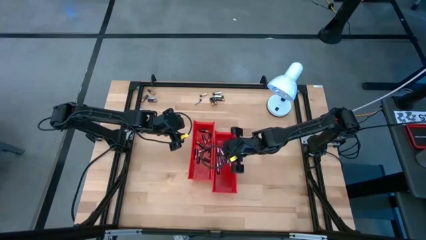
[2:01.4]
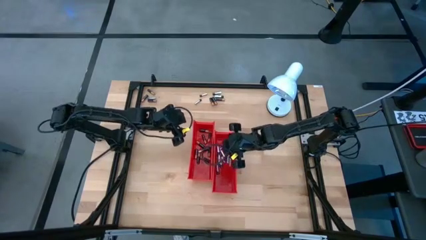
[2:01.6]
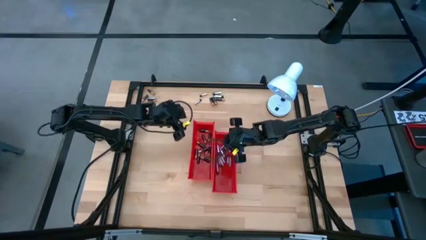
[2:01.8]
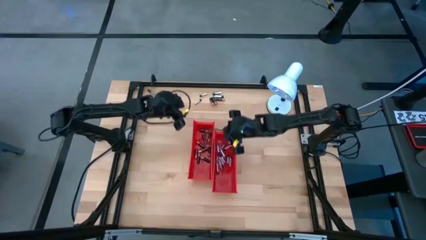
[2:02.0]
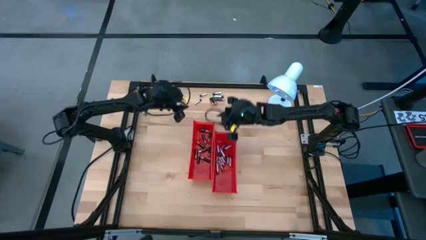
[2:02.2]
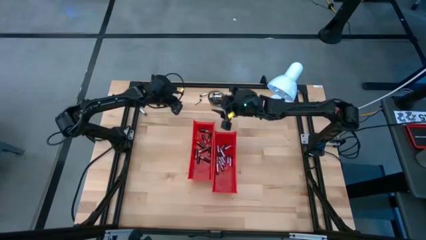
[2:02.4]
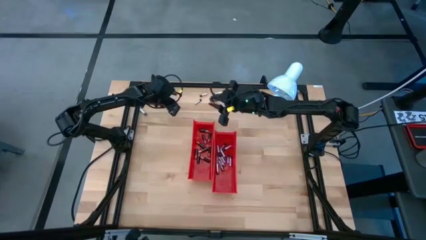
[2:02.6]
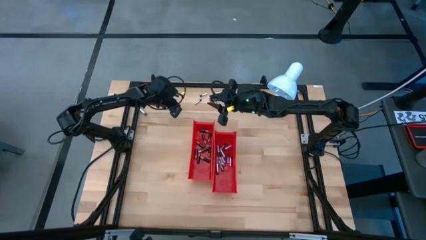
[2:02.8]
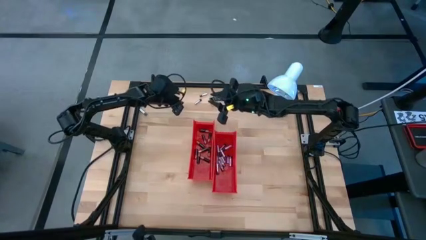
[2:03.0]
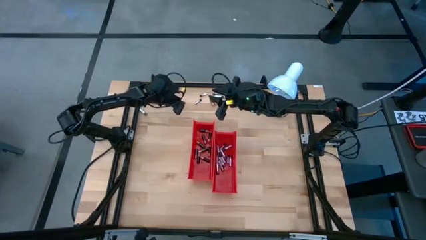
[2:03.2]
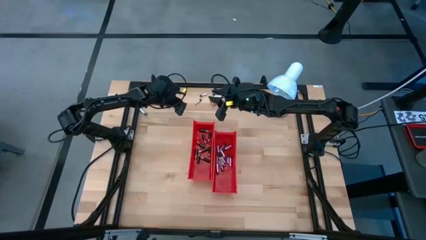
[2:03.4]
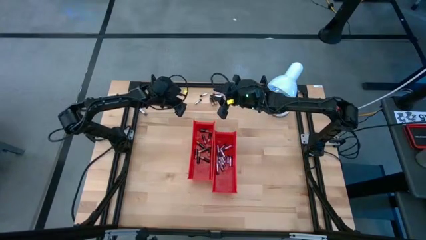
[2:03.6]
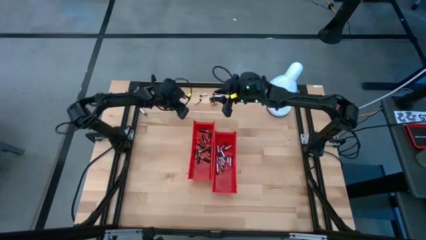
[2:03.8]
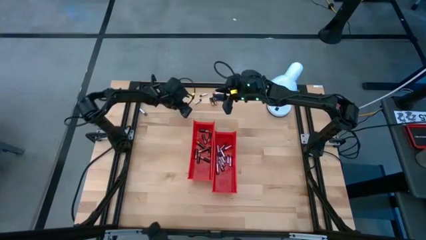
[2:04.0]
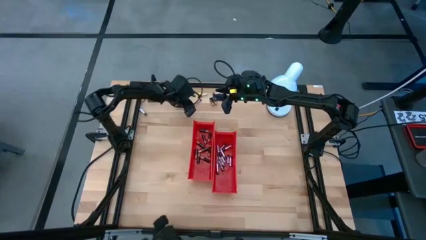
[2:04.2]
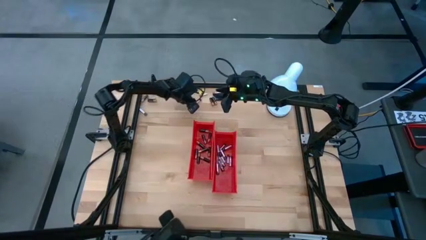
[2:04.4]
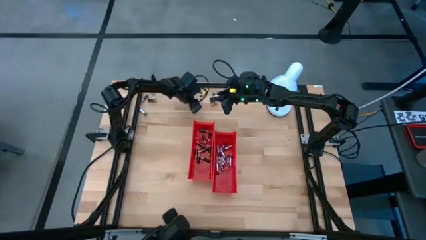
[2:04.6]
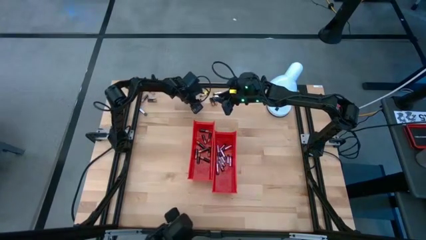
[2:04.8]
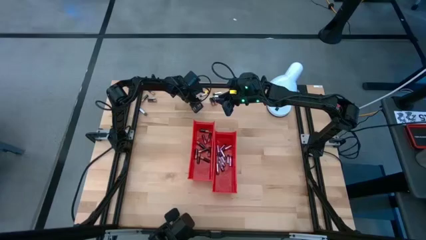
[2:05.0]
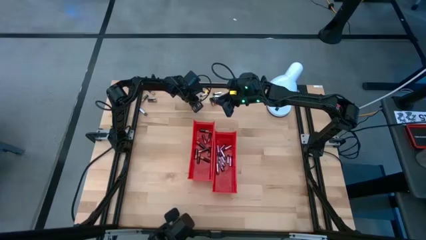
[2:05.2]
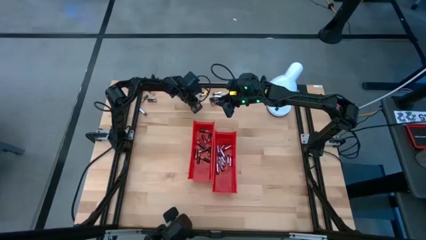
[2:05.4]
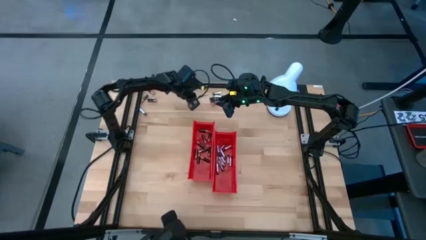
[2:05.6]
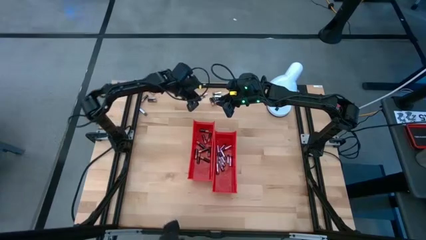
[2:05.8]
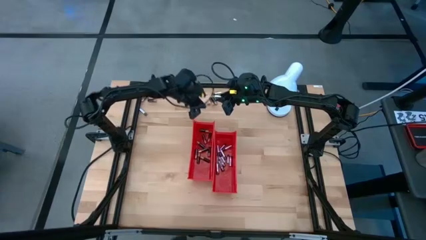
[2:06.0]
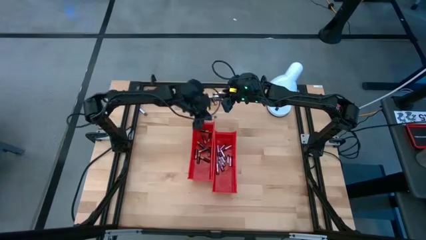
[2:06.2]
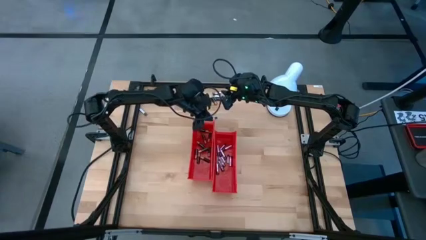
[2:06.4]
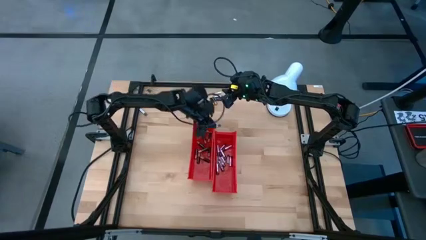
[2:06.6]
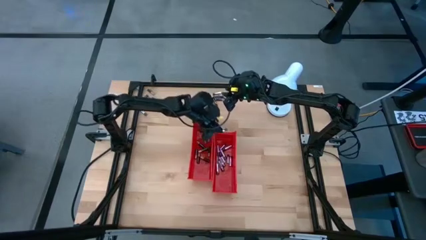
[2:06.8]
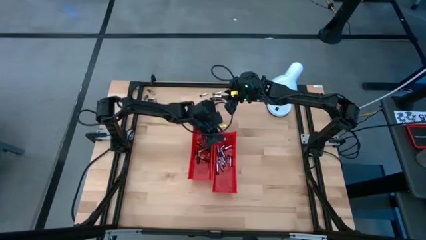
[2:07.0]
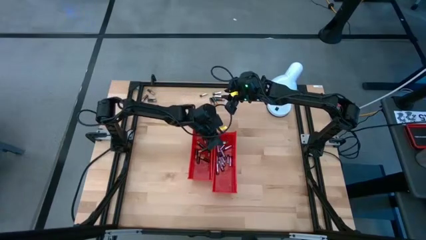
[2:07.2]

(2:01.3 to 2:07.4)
Task: Sort batteries
Put the silver battery into the right red bin

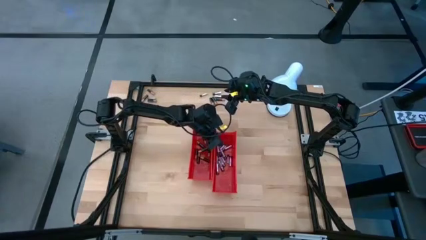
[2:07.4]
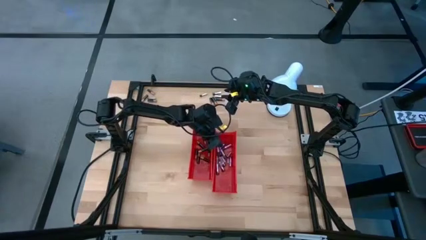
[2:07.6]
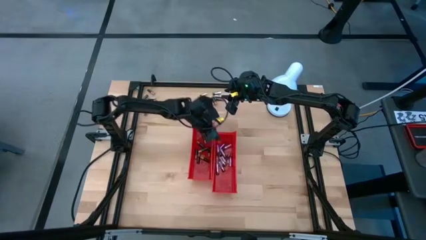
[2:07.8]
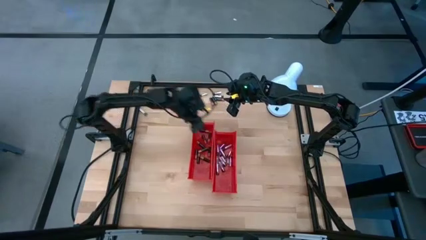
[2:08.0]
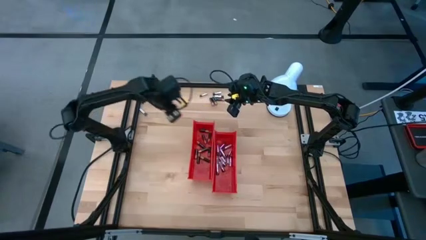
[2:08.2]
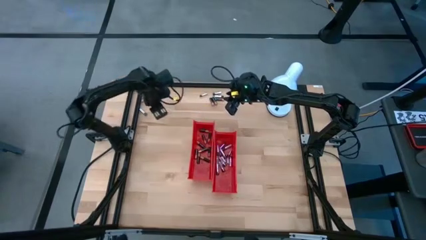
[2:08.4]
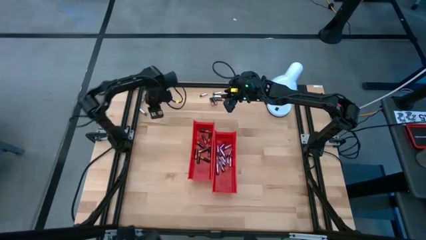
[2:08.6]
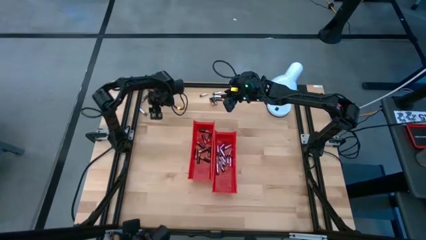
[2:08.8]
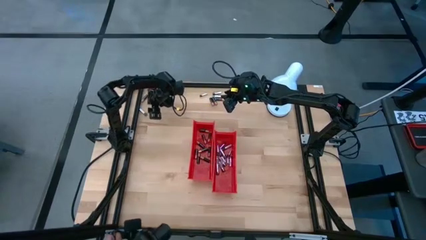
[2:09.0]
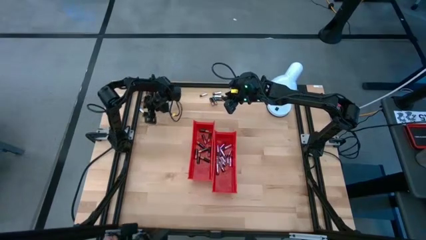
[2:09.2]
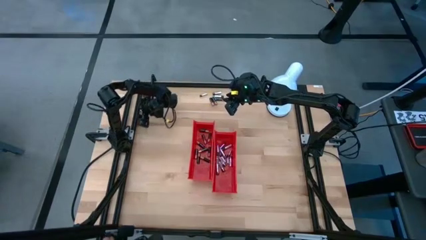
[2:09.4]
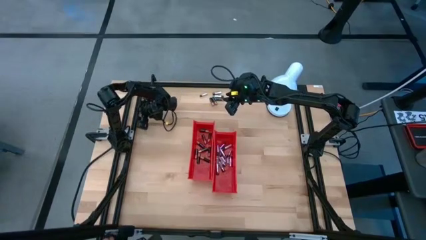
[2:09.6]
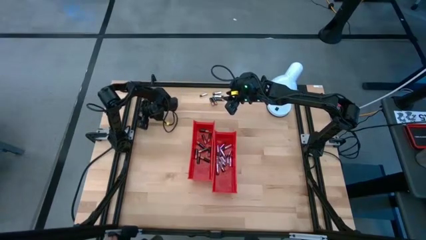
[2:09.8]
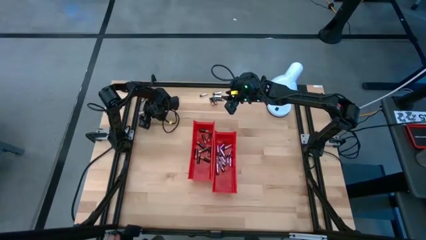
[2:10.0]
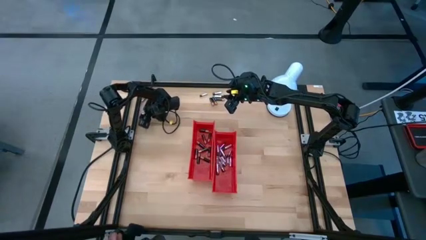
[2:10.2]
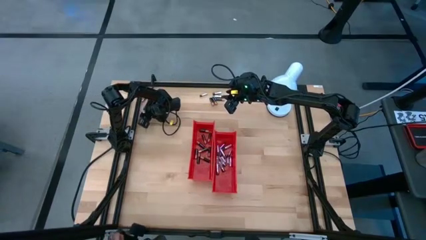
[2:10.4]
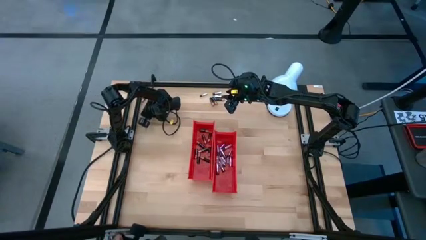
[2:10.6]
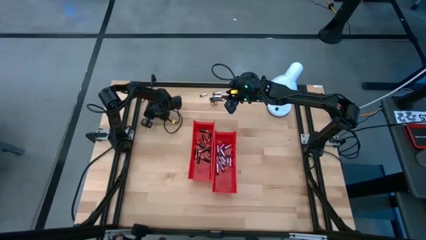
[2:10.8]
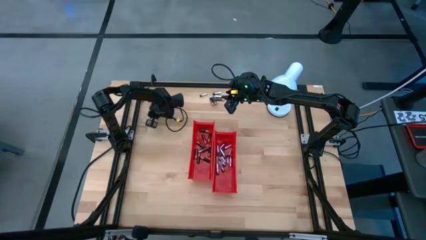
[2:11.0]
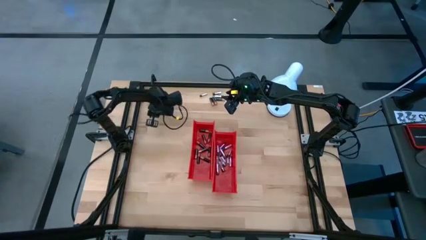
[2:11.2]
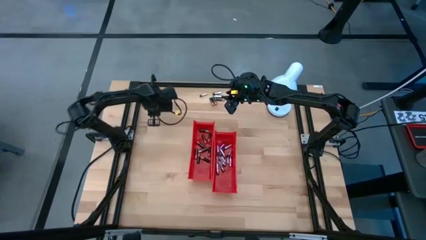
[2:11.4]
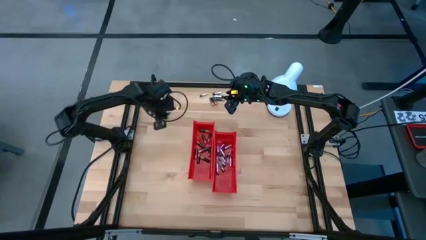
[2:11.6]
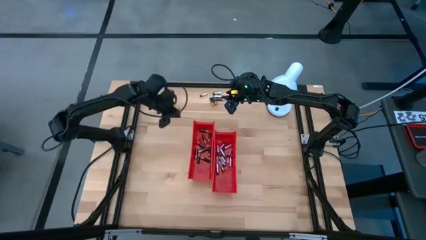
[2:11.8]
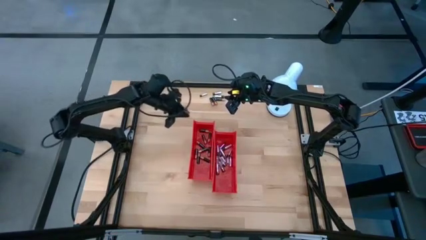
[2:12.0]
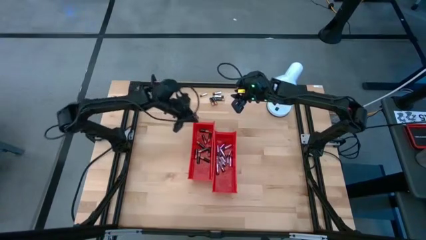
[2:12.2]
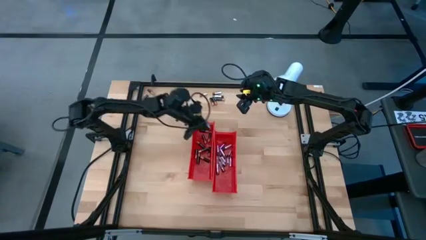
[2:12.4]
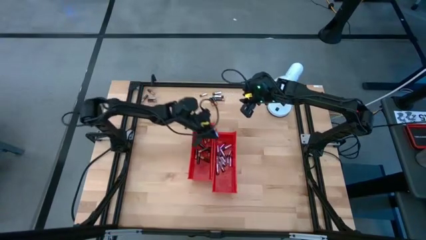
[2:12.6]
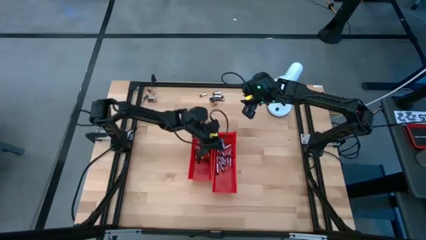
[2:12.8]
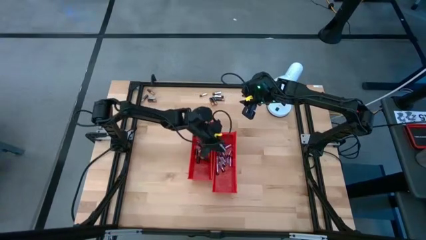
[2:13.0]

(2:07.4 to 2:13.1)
Put the silver battery into the right red bin

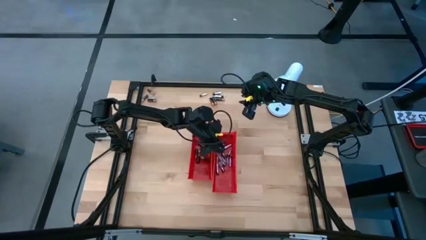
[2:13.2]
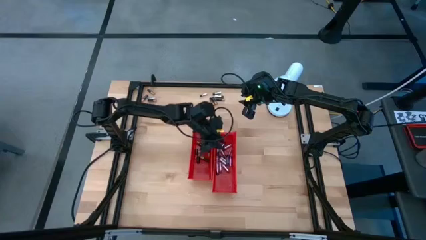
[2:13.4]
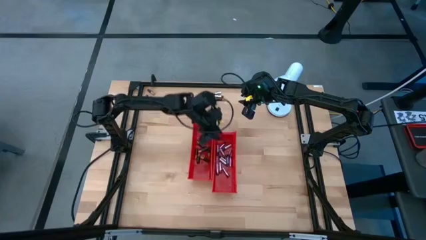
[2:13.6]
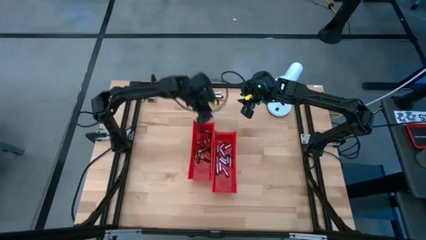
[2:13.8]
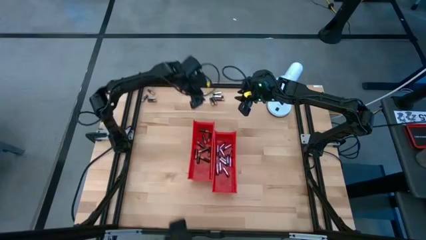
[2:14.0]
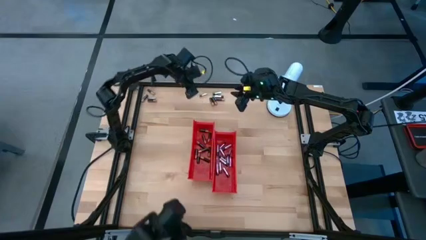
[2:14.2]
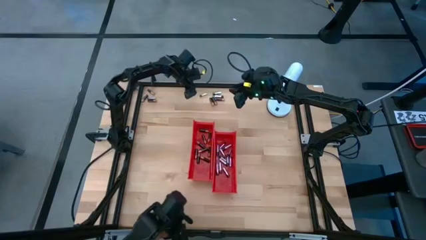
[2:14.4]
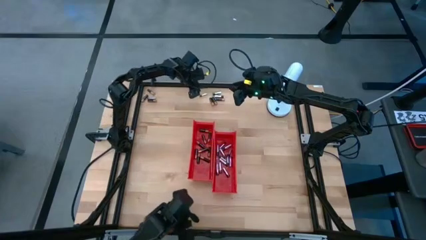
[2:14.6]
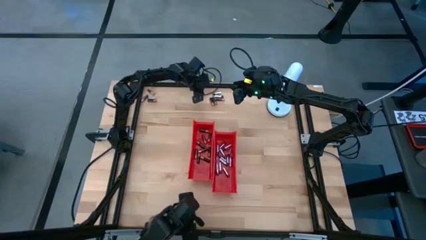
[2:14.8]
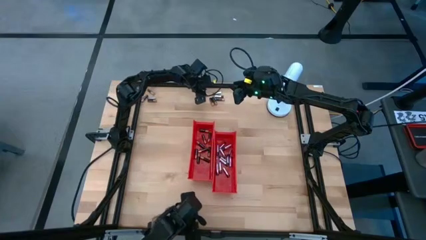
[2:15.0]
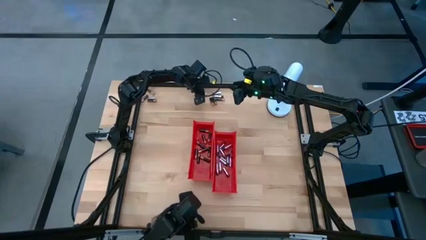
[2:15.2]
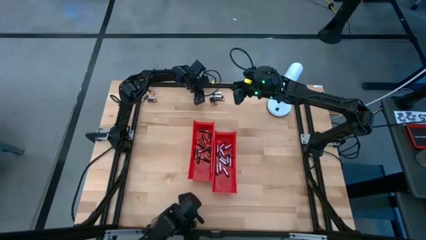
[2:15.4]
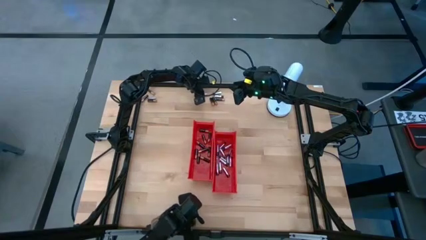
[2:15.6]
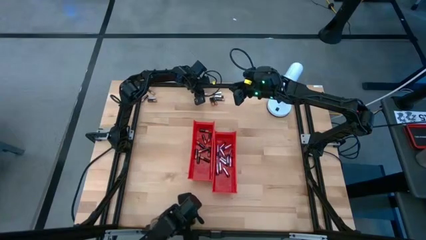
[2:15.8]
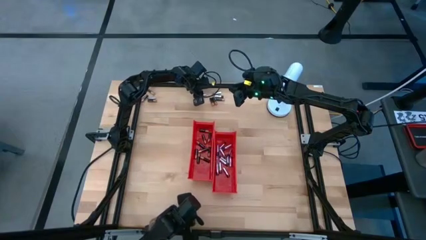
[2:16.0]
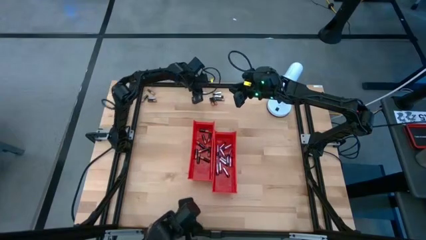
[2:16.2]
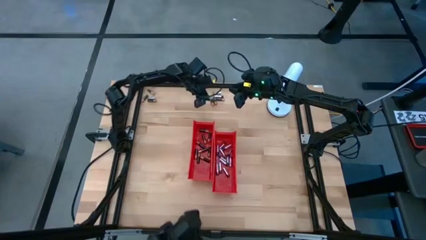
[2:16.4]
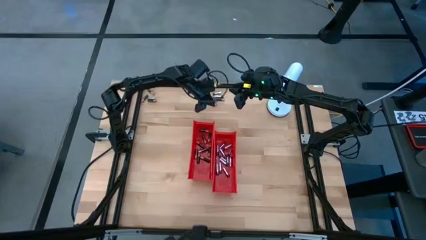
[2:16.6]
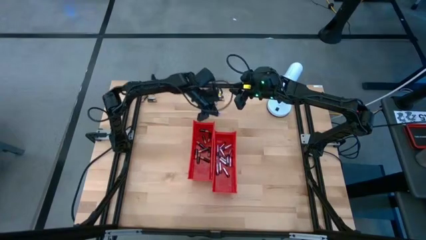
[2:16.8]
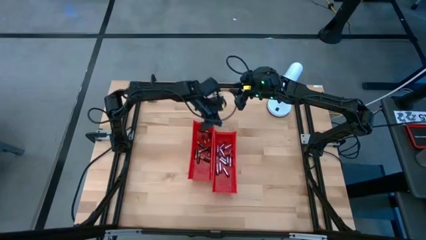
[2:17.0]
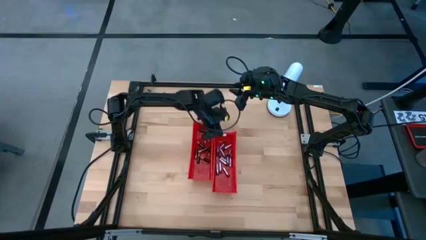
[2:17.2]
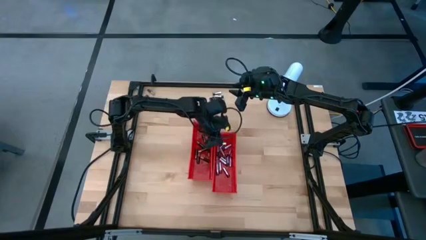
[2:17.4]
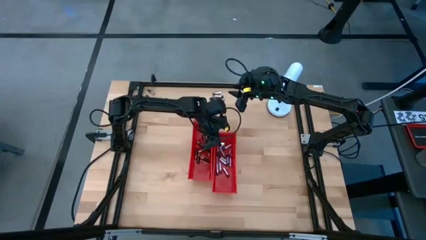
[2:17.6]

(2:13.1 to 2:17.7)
Put the silver battery into the right red bin
